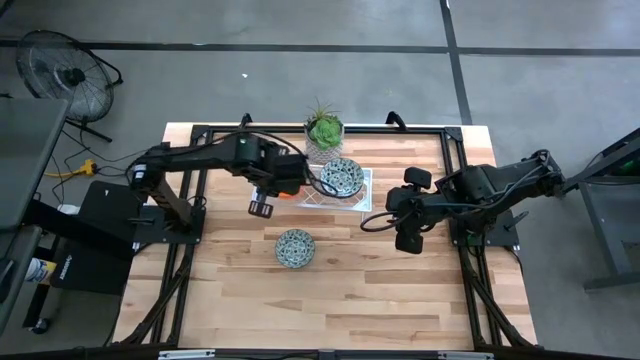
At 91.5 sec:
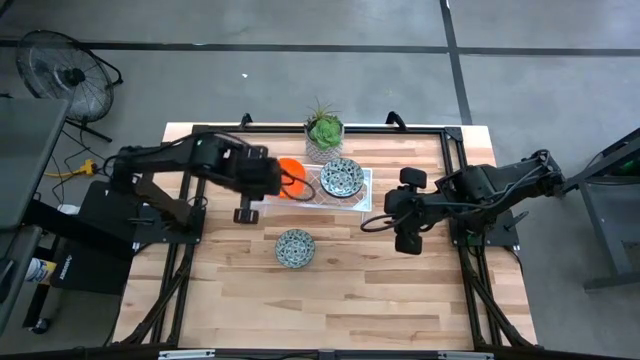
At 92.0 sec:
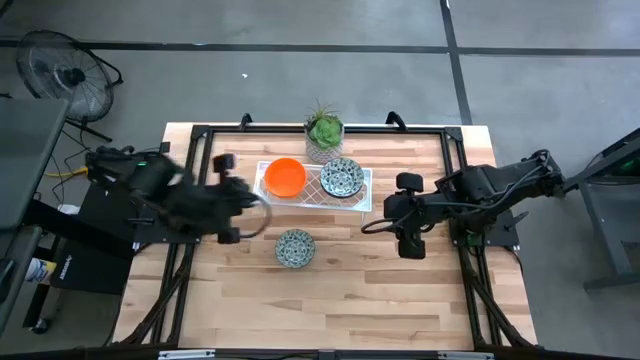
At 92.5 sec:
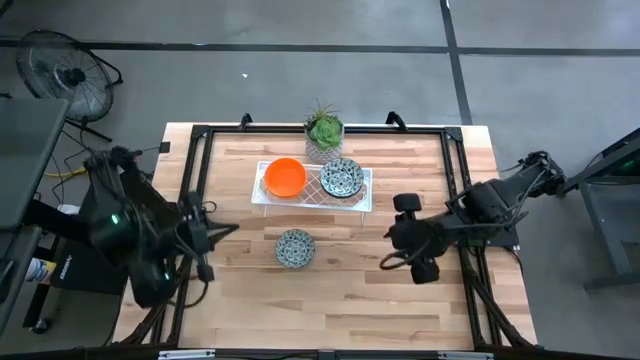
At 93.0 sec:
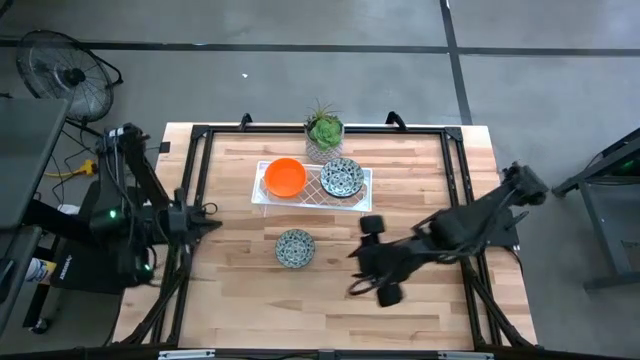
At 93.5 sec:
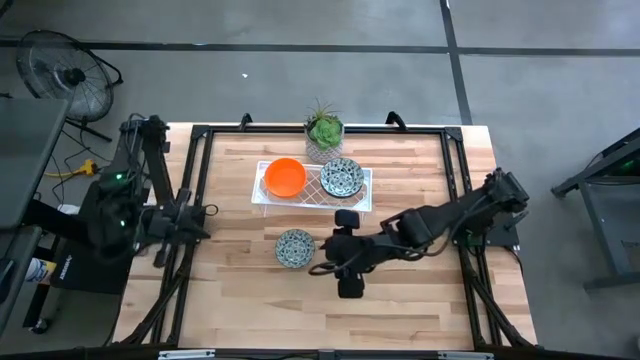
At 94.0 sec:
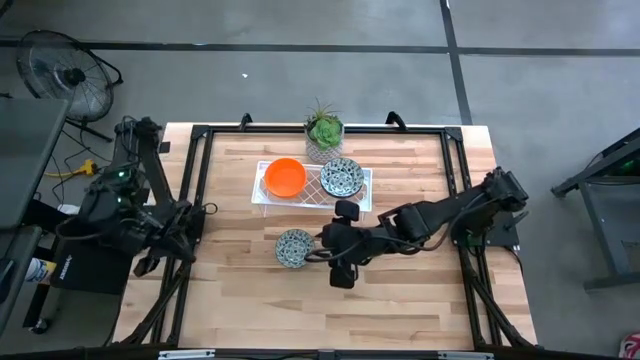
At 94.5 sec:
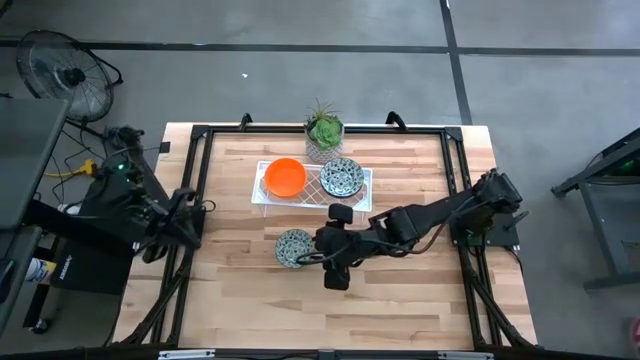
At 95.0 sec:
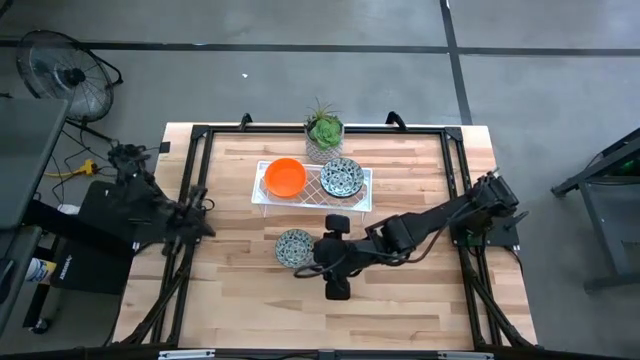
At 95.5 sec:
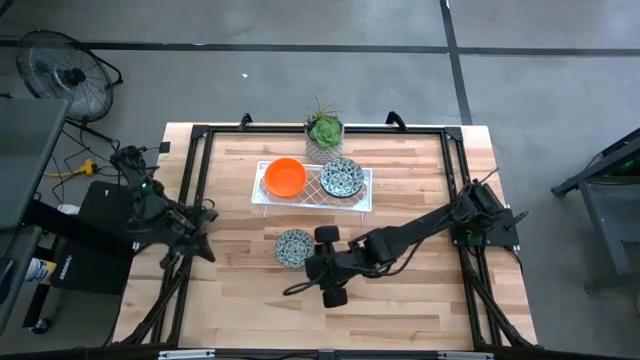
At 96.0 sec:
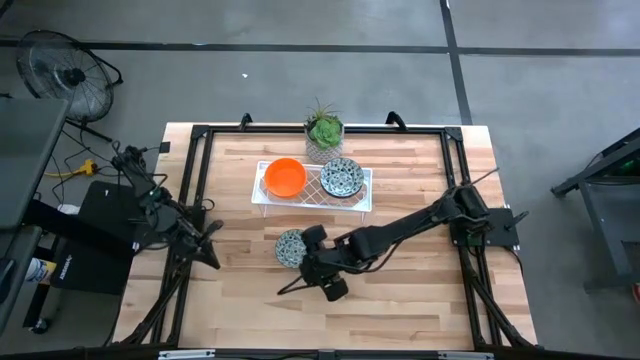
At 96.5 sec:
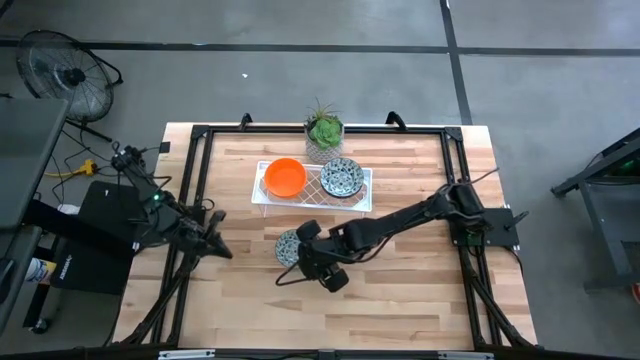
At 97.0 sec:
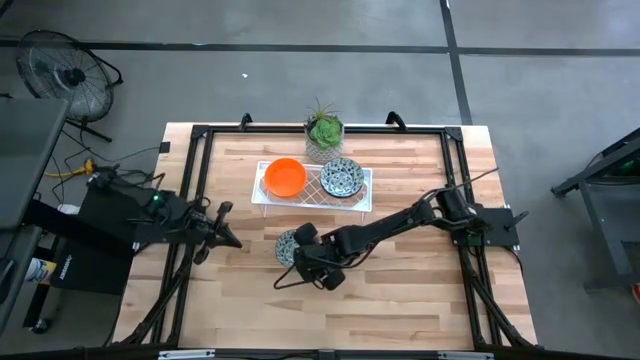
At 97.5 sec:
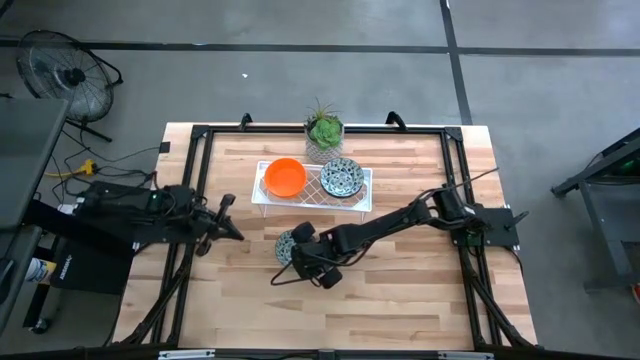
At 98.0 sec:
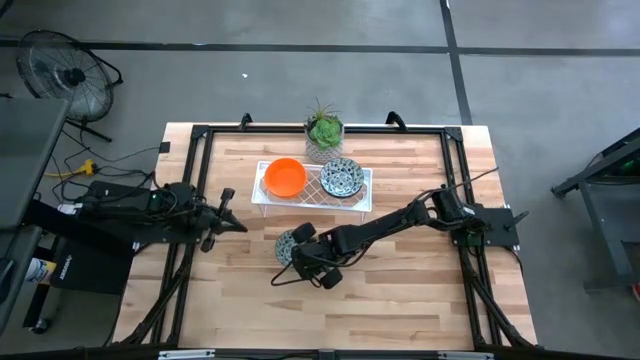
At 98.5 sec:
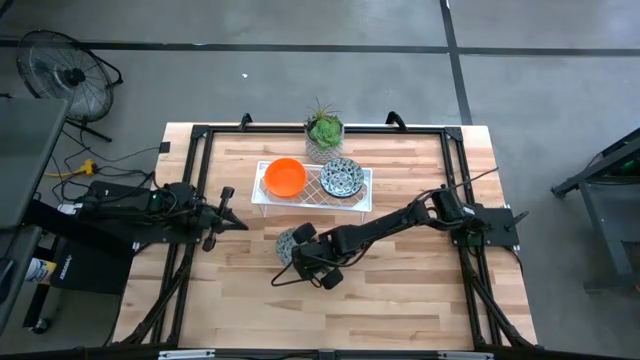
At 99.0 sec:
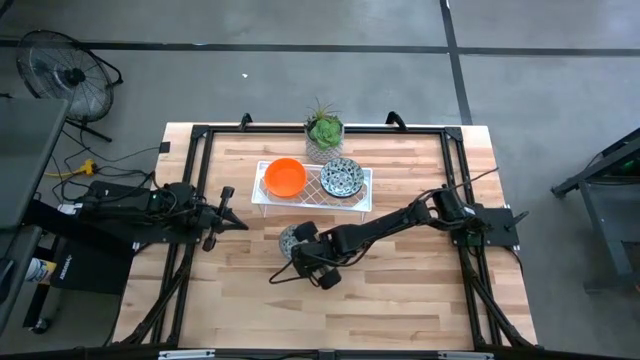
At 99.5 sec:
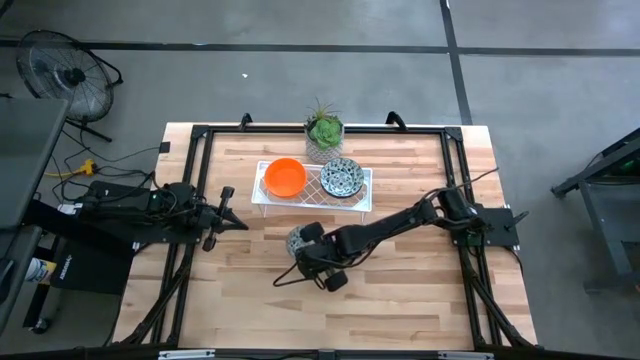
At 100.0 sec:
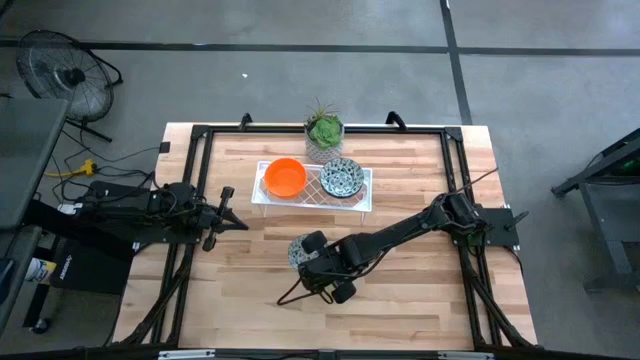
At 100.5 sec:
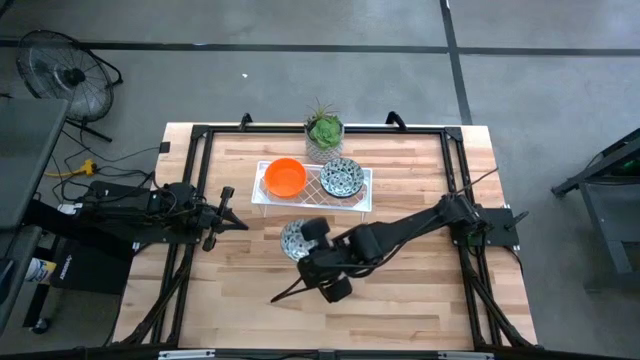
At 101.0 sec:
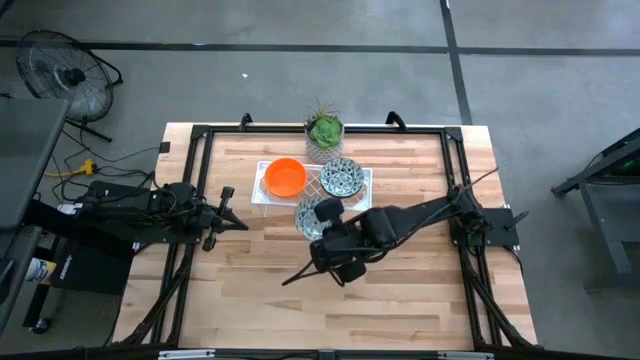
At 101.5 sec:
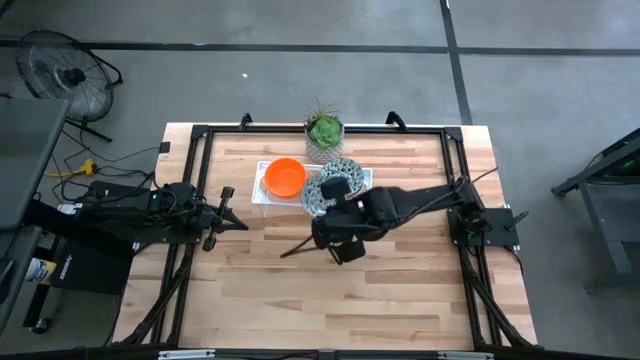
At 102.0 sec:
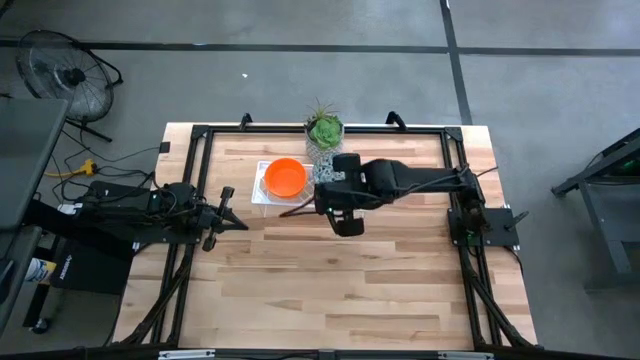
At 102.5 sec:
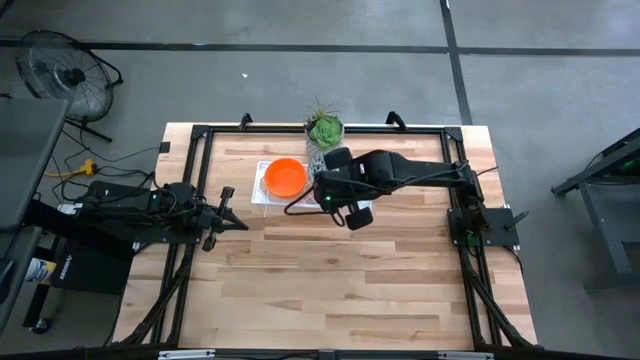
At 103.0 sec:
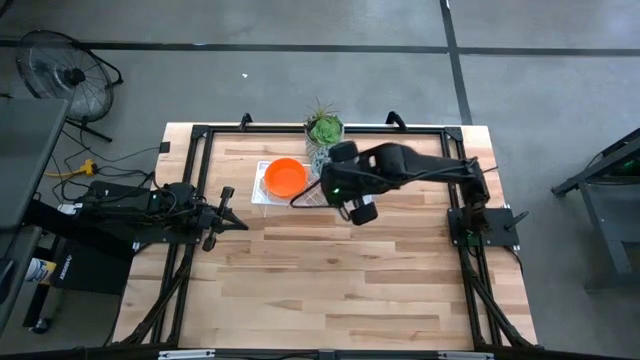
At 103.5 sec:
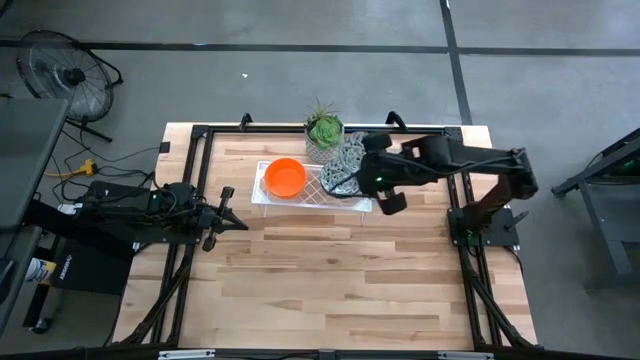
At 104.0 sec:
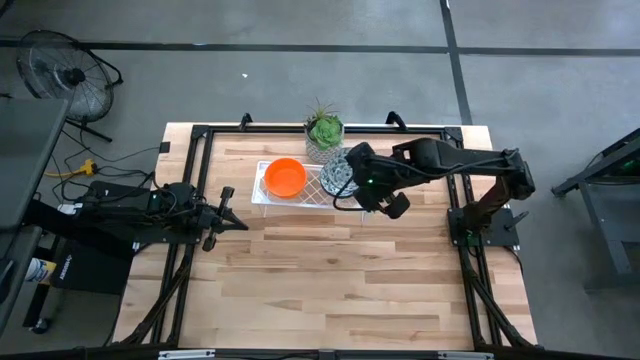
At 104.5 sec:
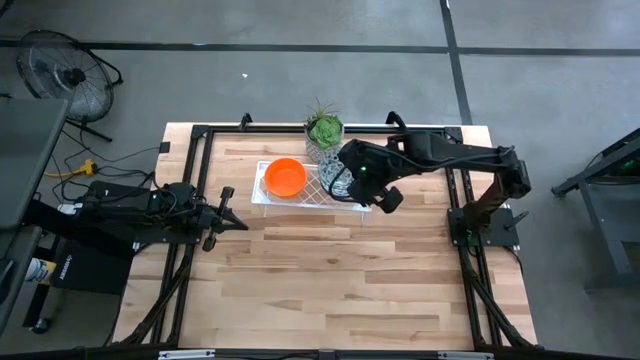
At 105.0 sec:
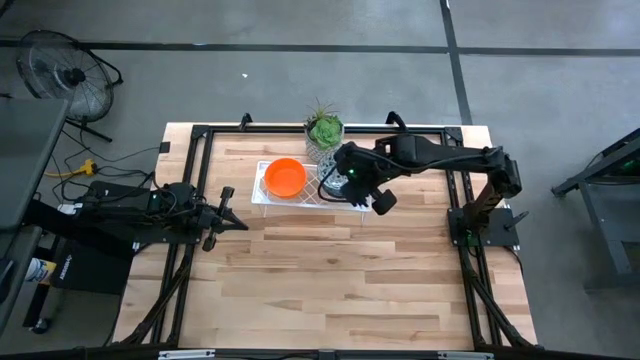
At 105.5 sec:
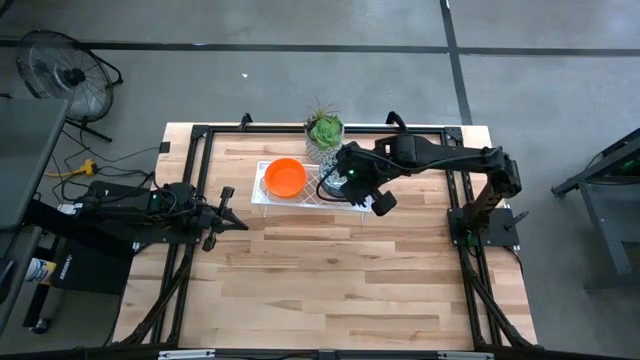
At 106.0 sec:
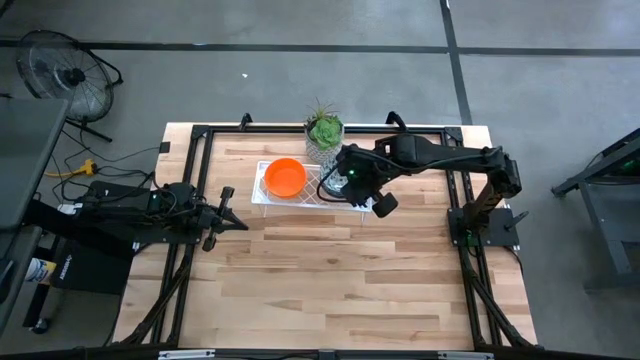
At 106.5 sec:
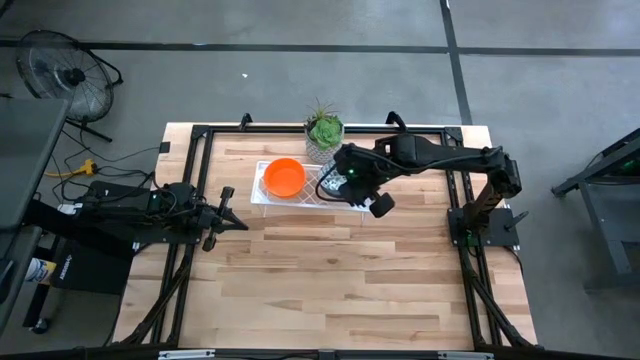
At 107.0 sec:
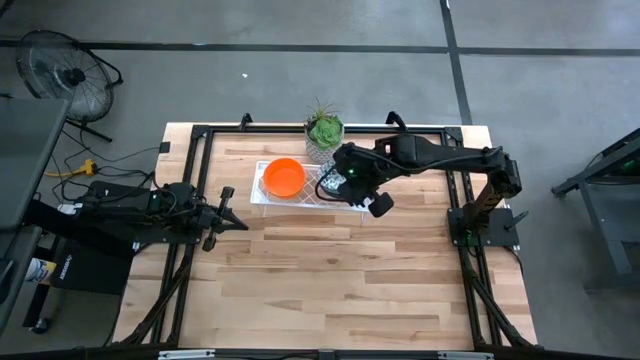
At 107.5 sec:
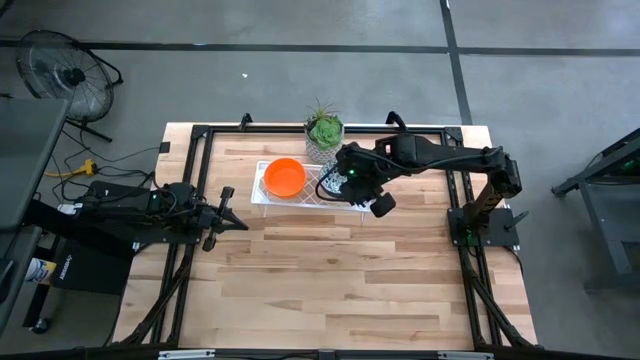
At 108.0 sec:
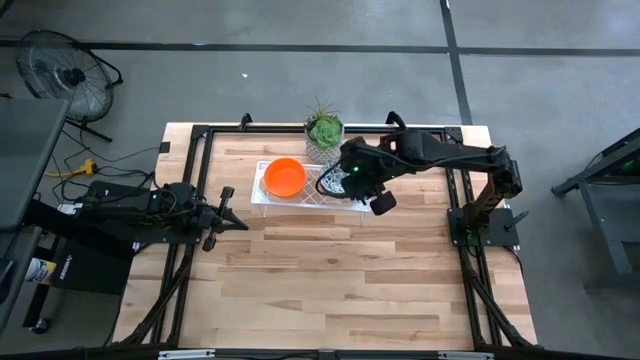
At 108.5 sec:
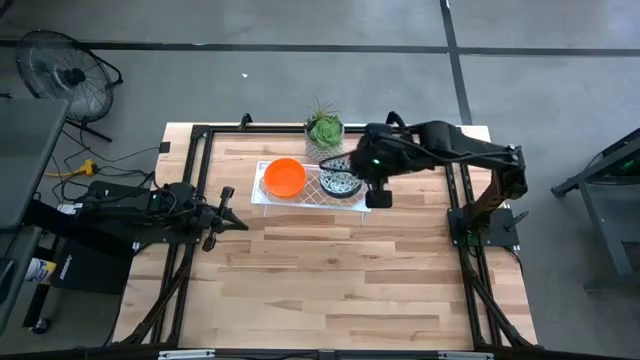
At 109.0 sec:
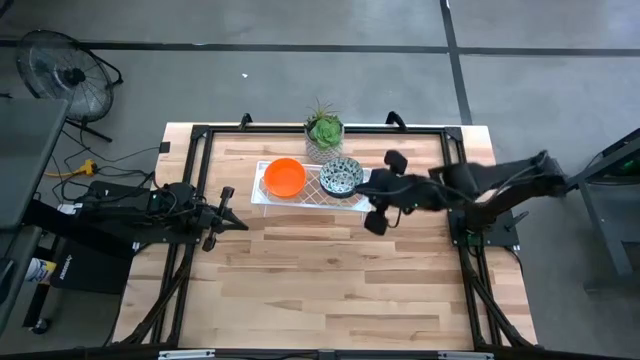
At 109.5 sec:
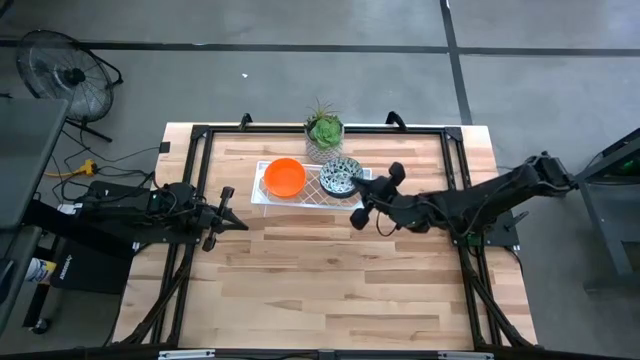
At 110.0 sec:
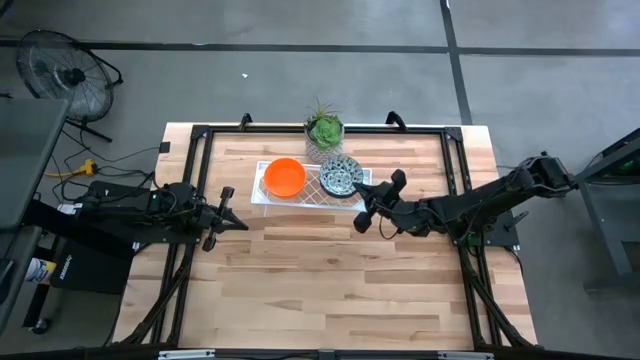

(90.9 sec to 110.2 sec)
Task: Pick & Place Mini bowls
Stack the blue bowl on the blue bowl on the shelf

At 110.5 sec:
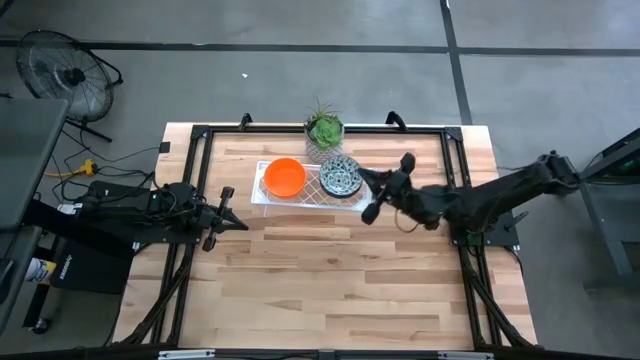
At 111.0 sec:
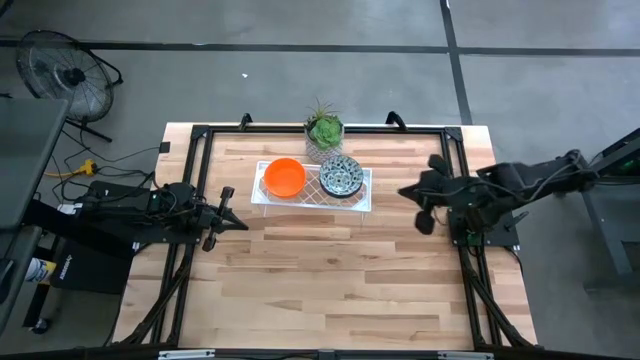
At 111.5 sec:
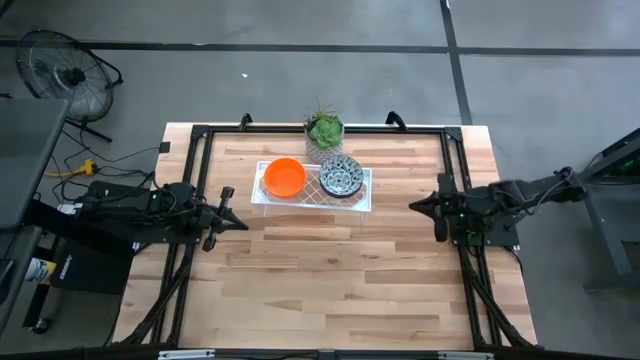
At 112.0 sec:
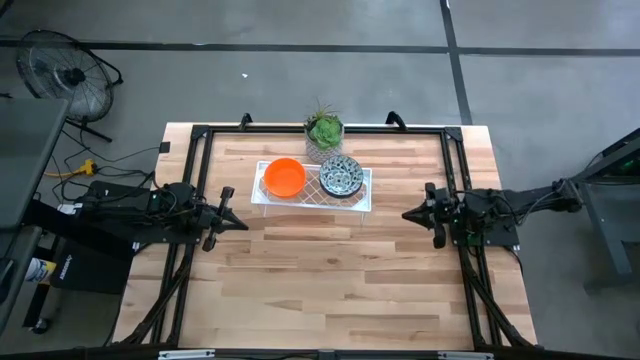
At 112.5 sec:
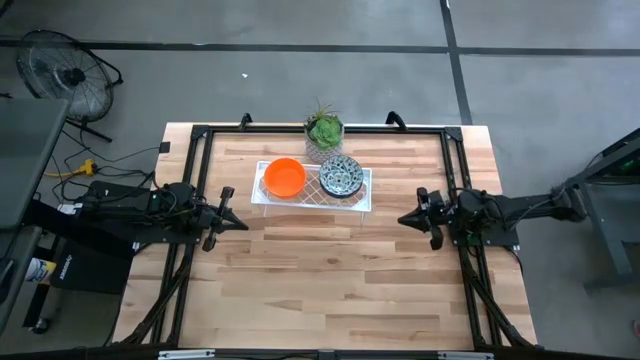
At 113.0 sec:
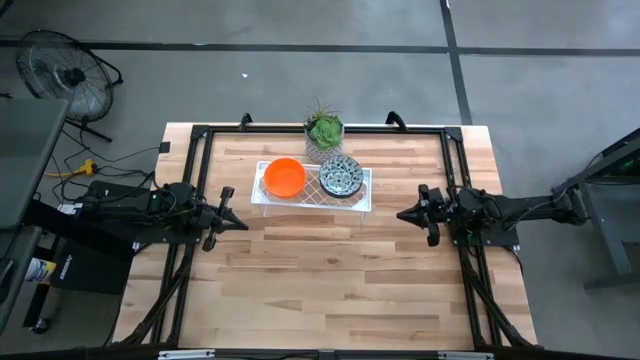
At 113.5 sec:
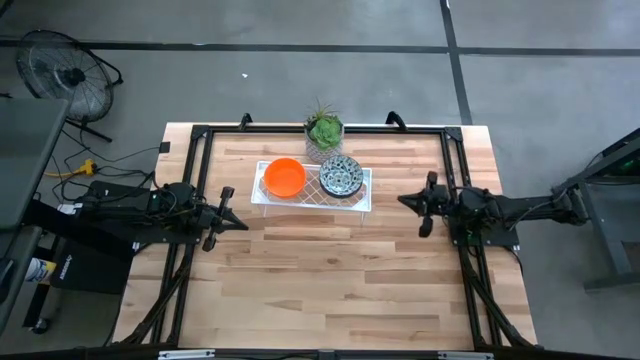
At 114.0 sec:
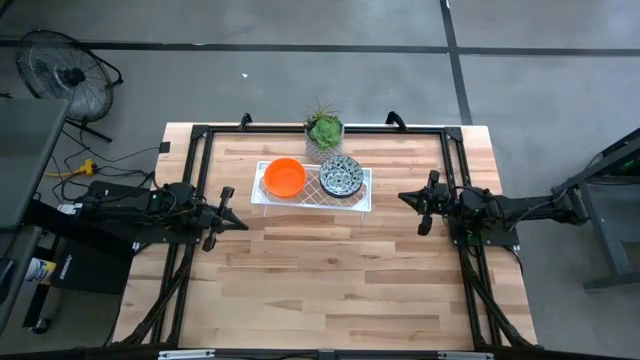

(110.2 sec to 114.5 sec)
Return to Home Position
